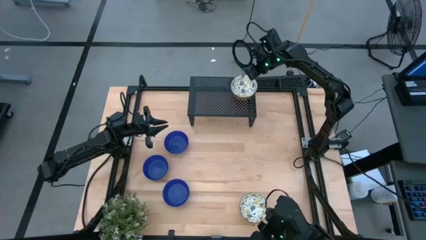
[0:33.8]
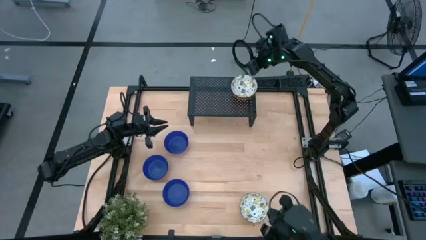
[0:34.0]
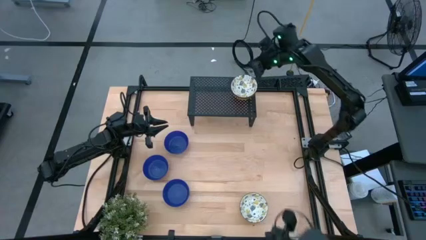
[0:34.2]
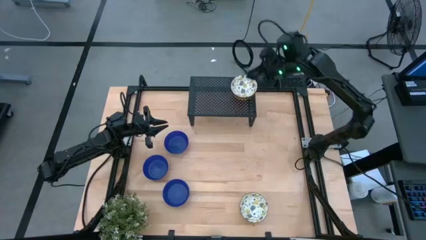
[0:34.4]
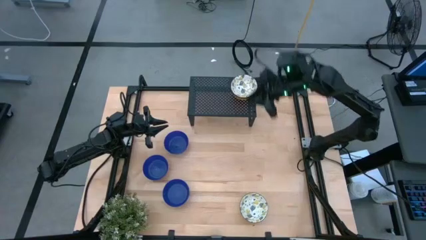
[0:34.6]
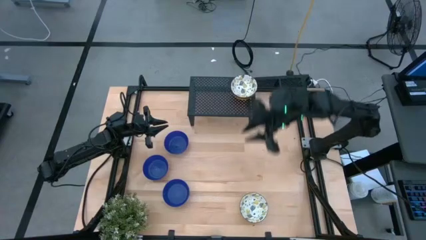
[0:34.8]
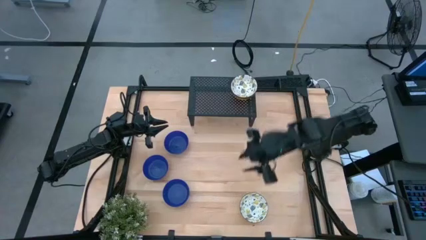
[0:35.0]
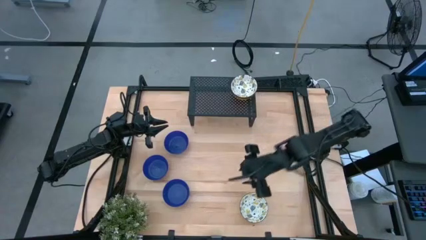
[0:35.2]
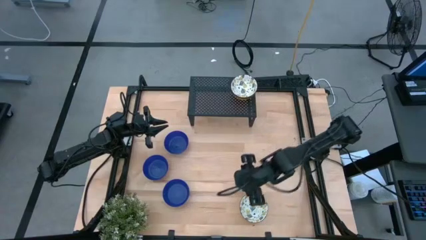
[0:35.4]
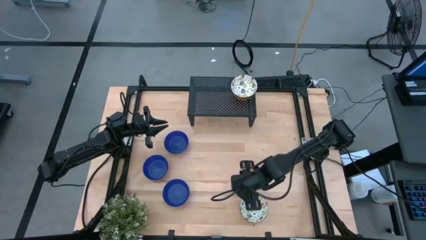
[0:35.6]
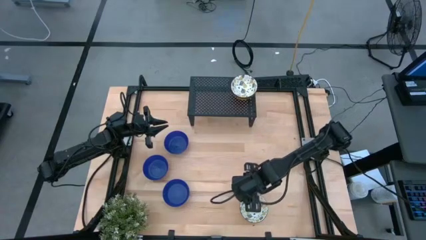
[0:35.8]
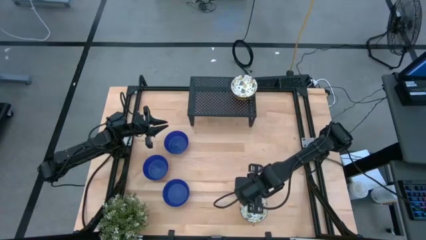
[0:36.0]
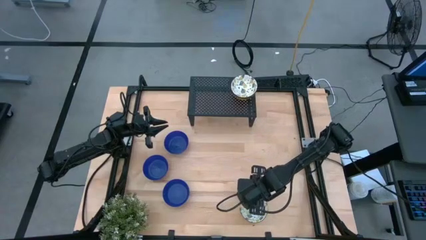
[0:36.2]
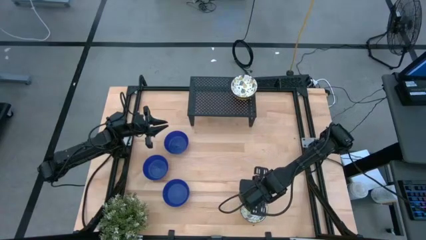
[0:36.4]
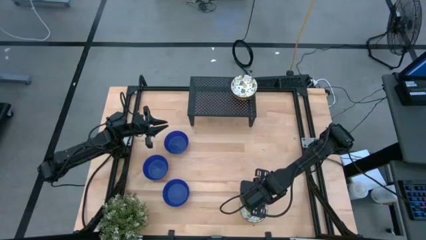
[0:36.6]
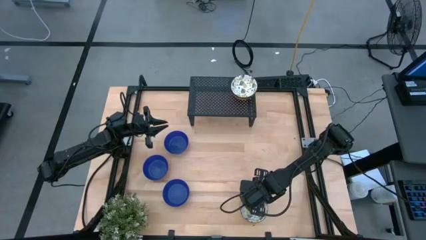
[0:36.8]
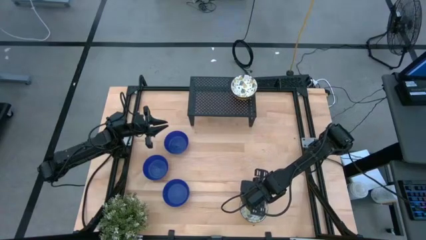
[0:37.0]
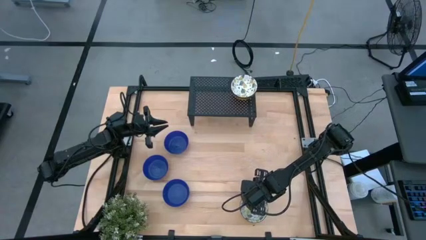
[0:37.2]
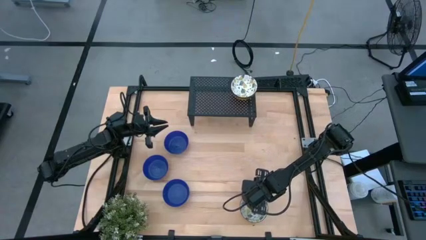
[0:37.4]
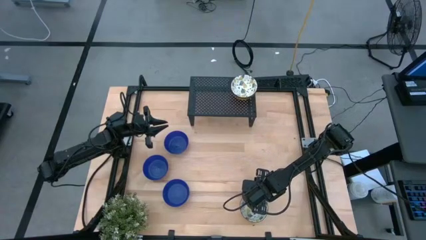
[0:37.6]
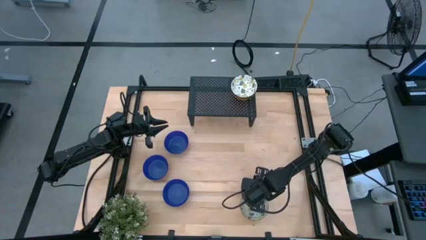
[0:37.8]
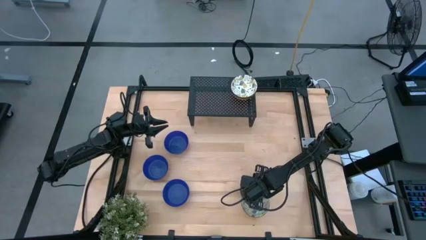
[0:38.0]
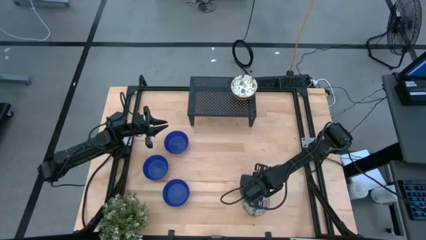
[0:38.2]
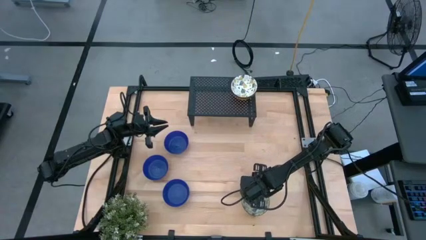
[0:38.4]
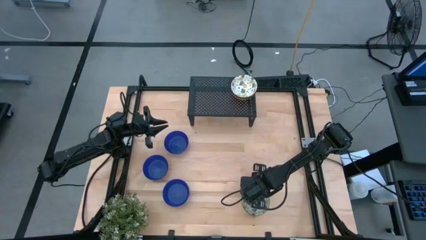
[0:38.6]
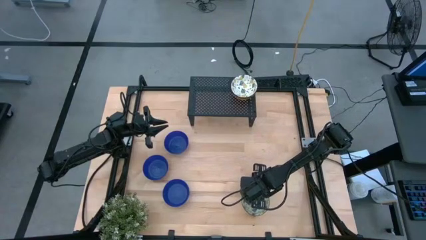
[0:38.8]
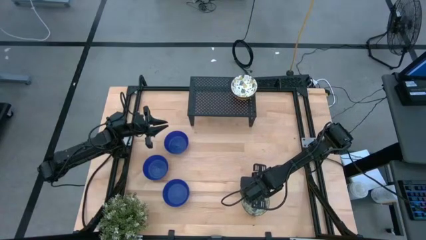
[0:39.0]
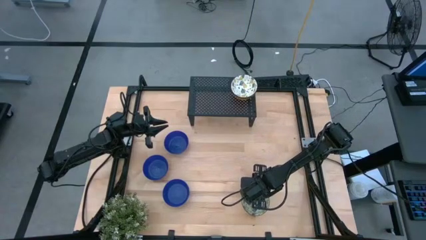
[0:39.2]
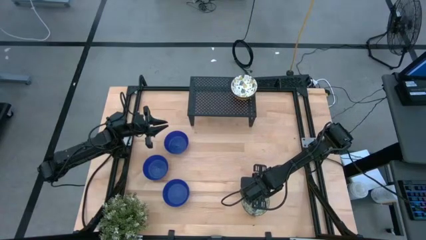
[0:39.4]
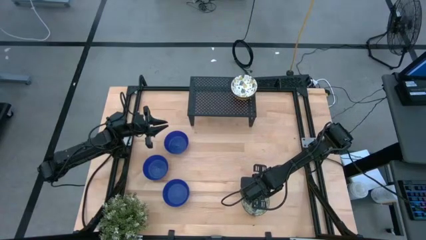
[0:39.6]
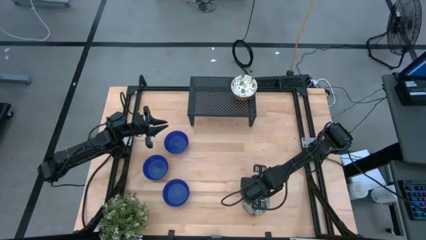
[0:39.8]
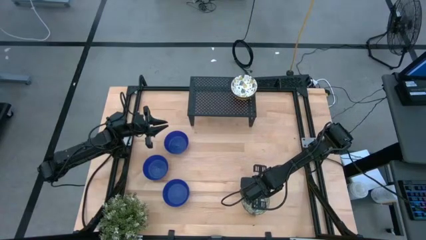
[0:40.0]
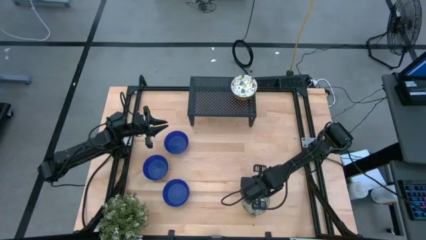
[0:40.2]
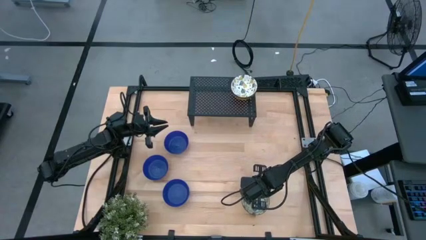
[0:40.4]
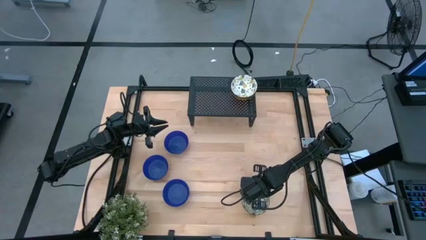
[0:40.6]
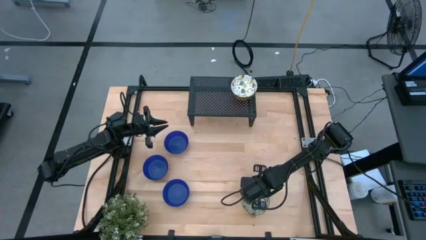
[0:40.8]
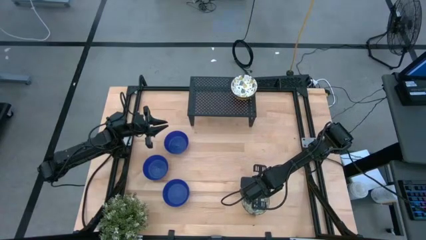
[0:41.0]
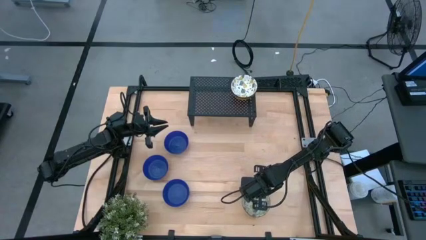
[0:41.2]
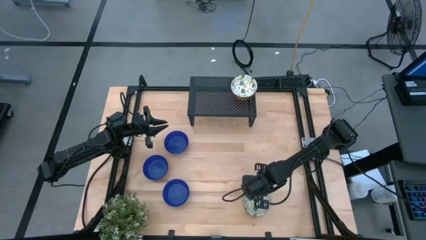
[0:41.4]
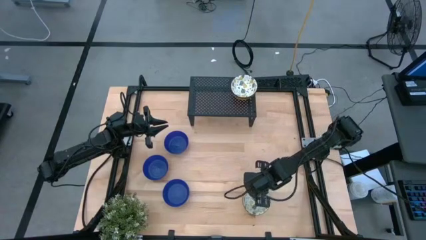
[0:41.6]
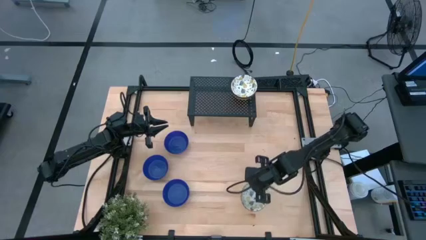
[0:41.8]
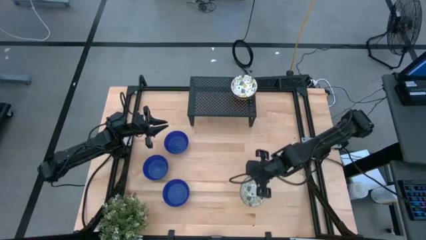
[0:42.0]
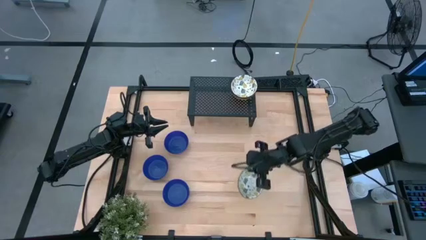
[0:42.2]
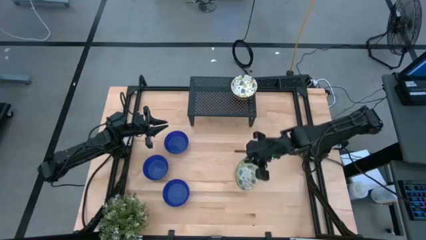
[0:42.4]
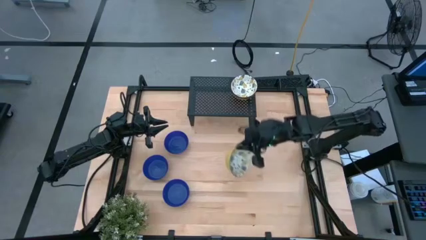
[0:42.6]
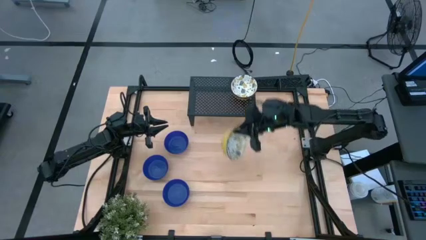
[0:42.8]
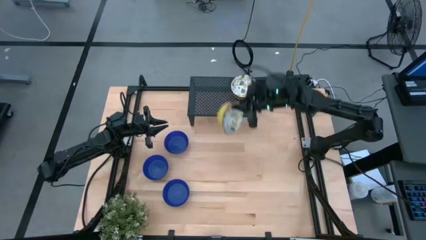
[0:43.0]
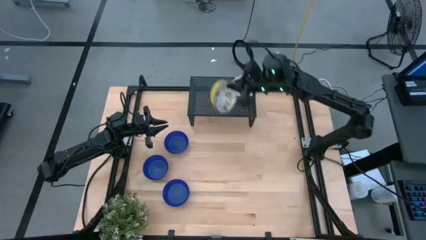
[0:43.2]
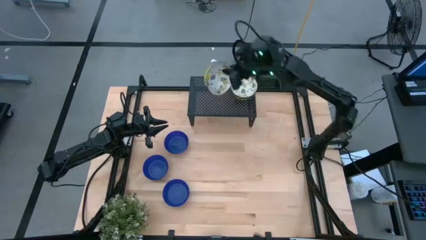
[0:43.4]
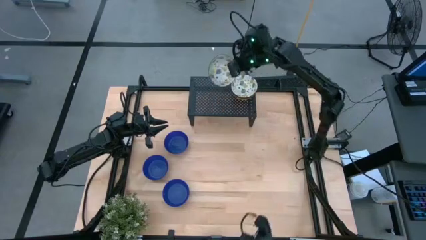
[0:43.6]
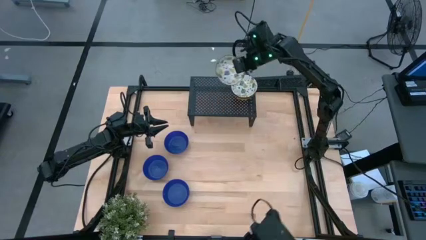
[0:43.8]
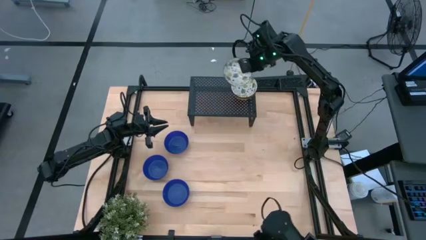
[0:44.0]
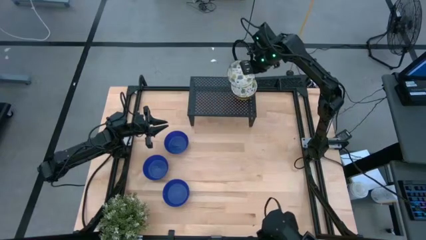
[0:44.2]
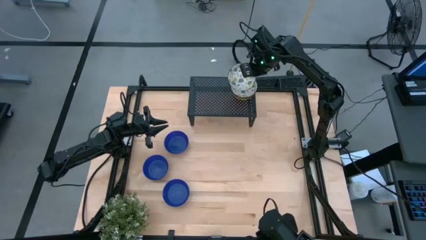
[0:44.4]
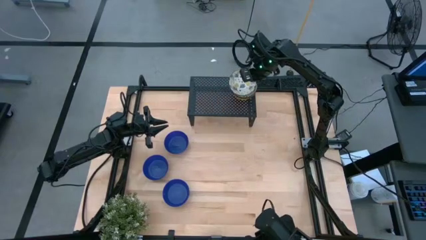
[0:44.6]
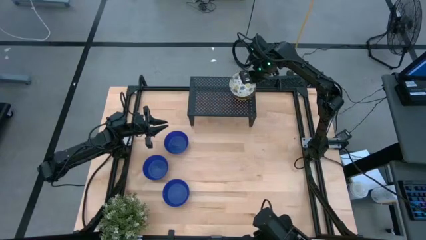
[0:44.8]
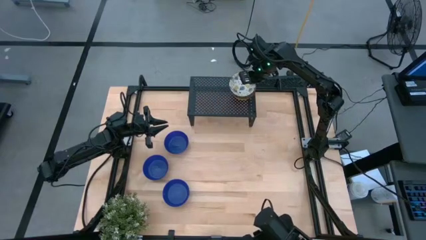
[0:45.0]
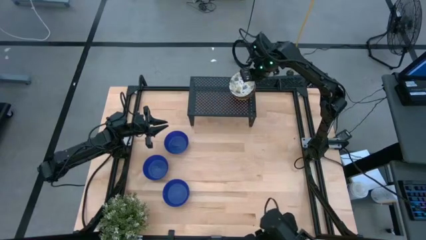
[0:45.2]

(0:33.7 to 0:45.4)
Task: Pick & Place Mini bowls
Stack the white patterned bowl on the white patterned bowl on the shelf
